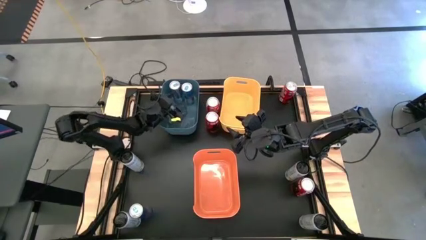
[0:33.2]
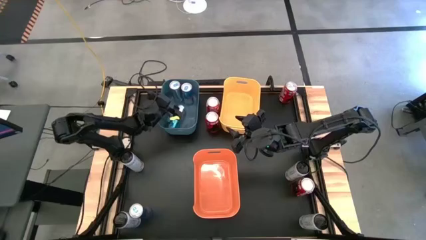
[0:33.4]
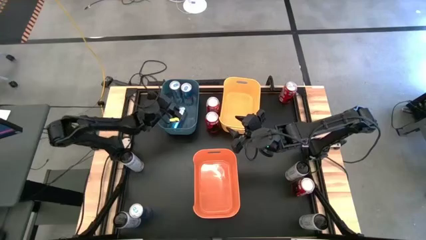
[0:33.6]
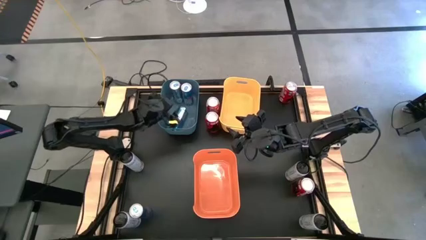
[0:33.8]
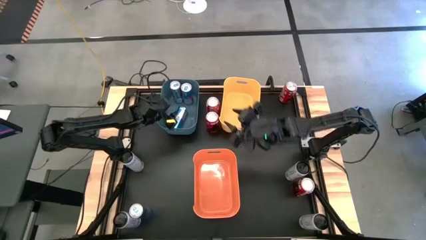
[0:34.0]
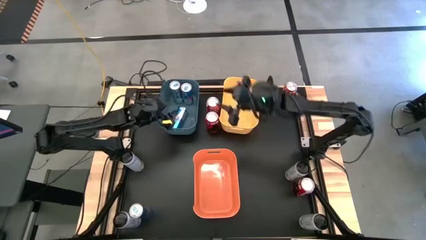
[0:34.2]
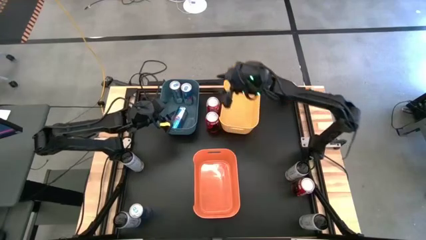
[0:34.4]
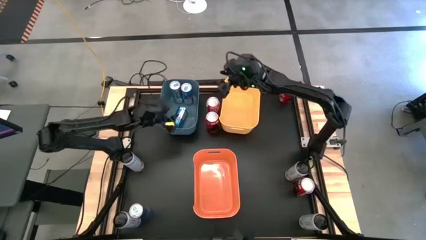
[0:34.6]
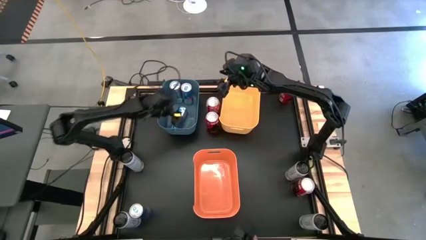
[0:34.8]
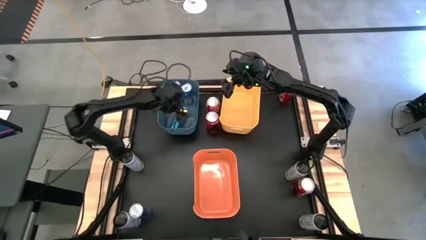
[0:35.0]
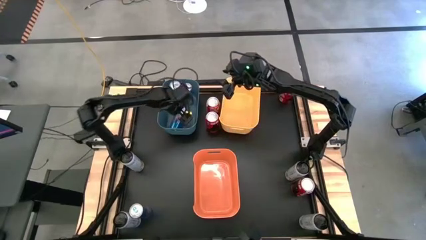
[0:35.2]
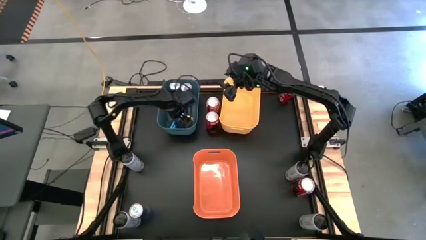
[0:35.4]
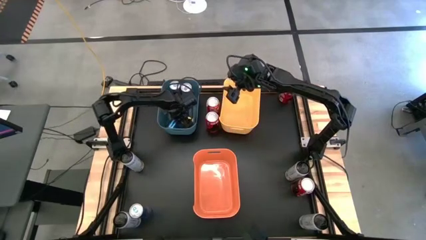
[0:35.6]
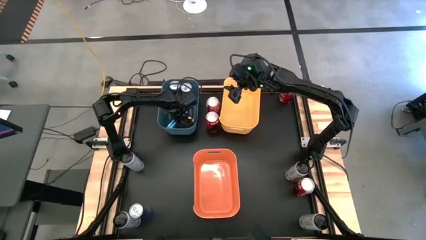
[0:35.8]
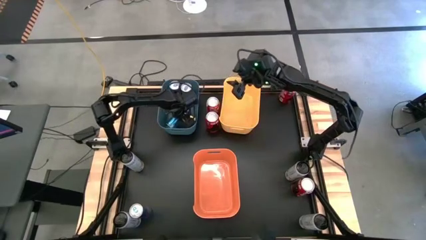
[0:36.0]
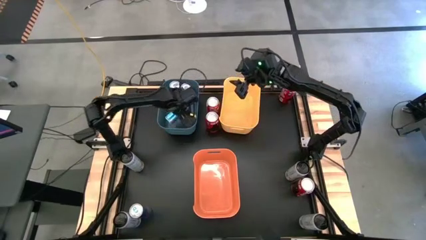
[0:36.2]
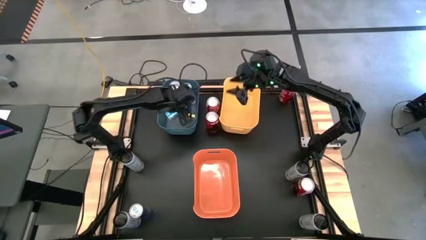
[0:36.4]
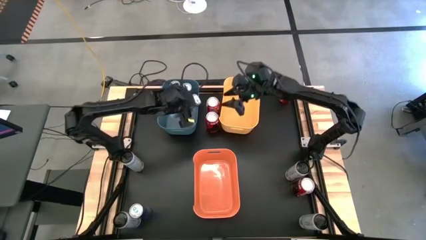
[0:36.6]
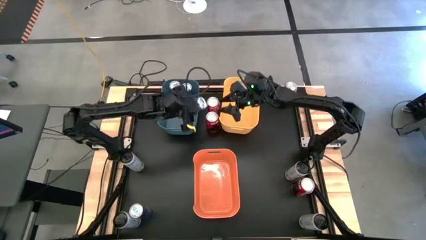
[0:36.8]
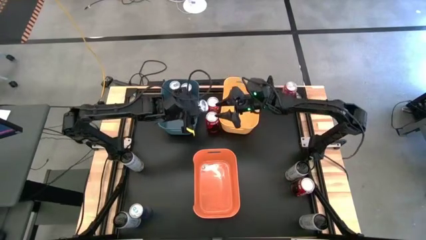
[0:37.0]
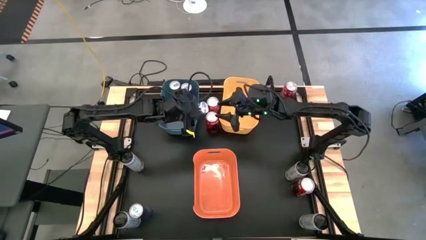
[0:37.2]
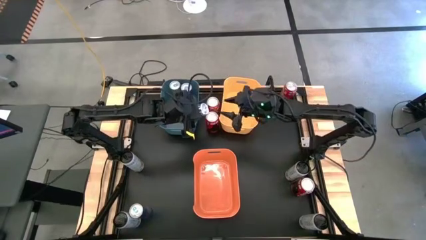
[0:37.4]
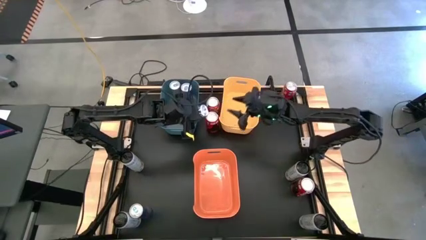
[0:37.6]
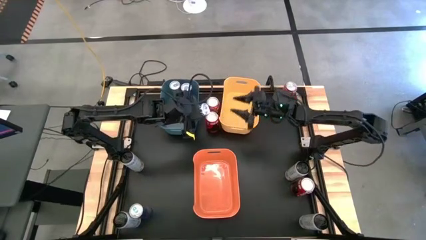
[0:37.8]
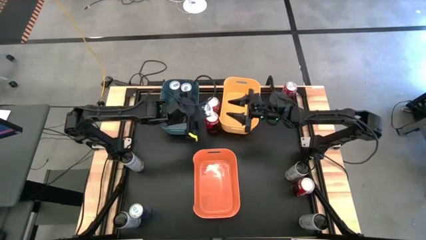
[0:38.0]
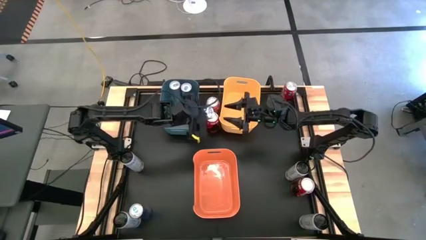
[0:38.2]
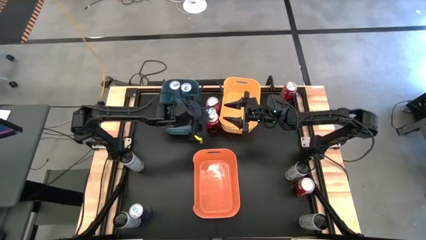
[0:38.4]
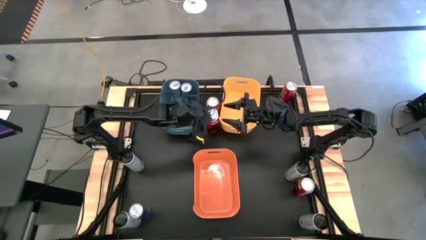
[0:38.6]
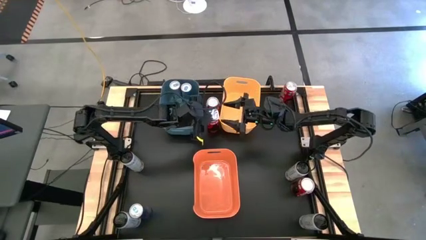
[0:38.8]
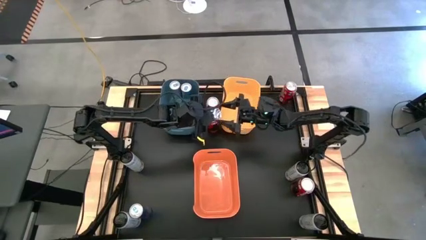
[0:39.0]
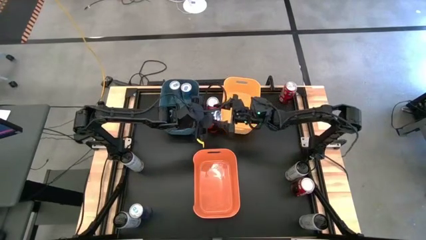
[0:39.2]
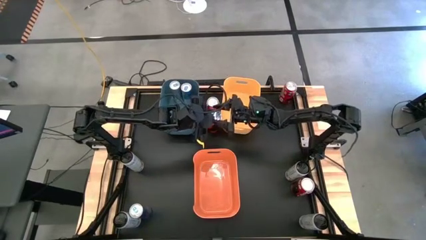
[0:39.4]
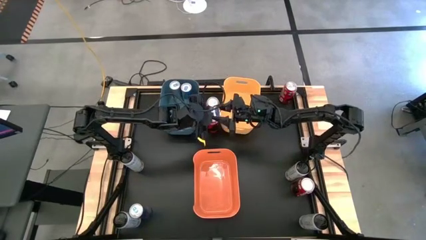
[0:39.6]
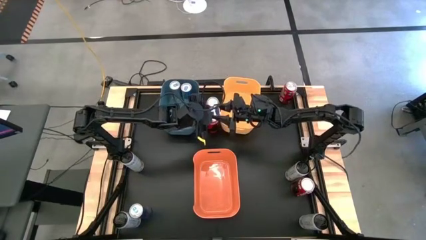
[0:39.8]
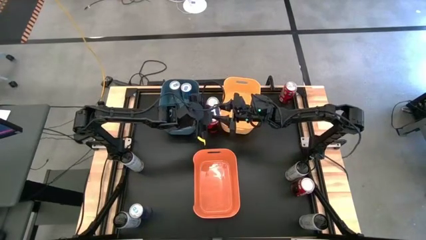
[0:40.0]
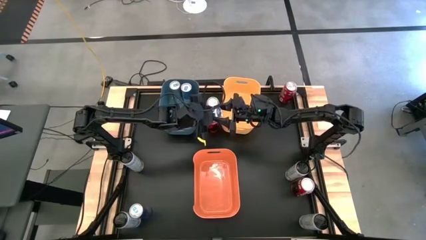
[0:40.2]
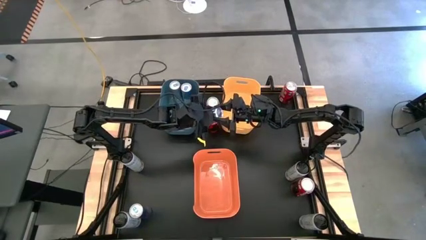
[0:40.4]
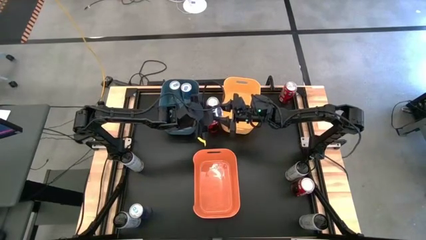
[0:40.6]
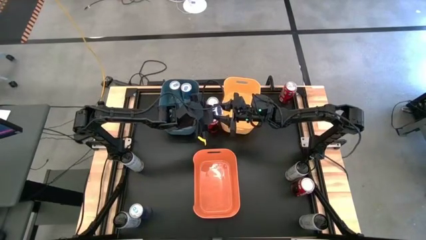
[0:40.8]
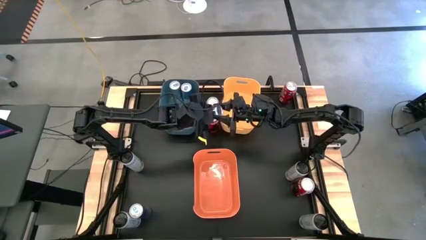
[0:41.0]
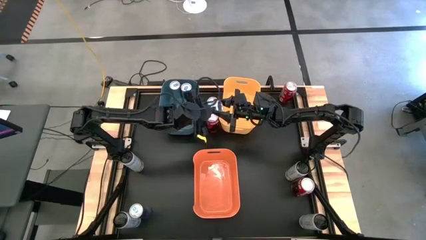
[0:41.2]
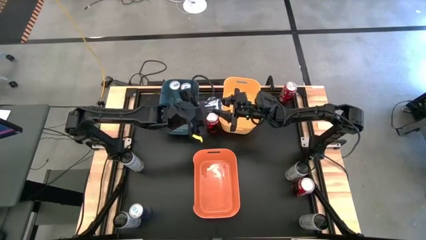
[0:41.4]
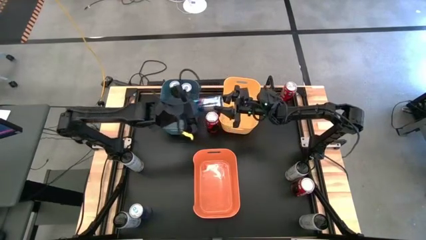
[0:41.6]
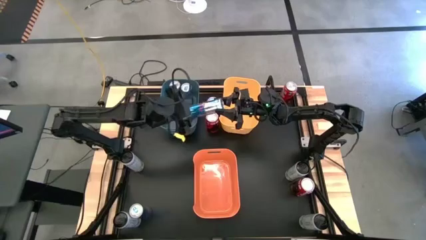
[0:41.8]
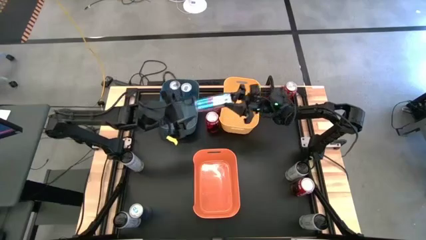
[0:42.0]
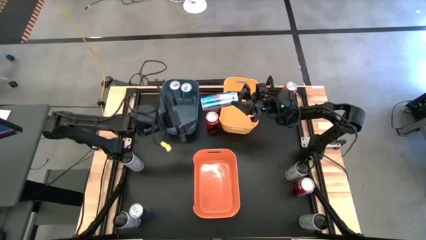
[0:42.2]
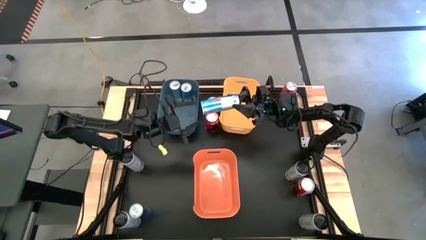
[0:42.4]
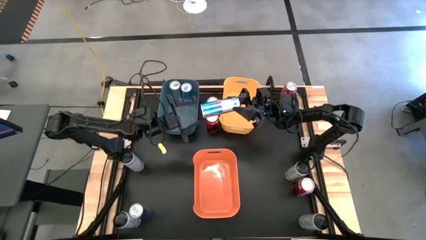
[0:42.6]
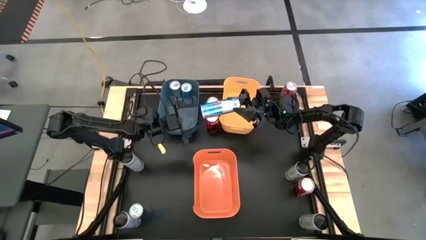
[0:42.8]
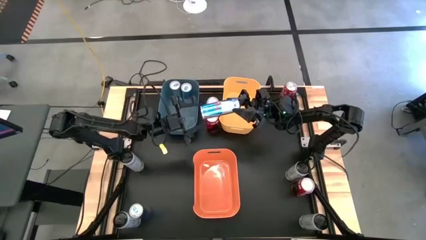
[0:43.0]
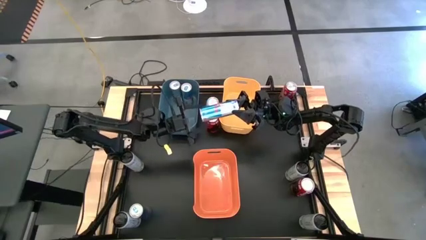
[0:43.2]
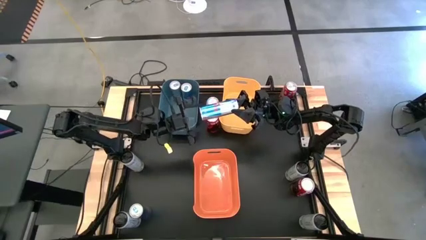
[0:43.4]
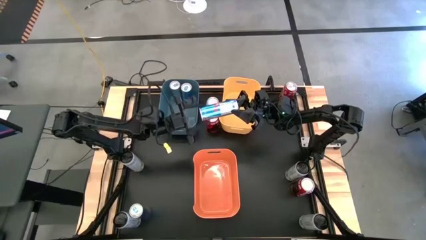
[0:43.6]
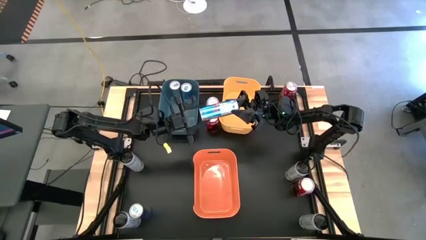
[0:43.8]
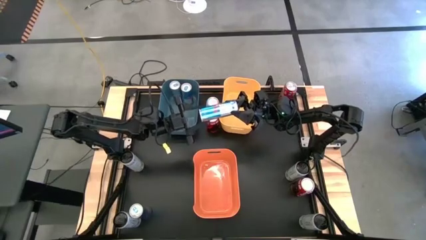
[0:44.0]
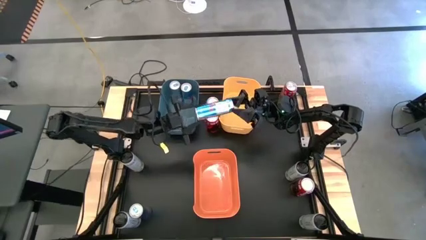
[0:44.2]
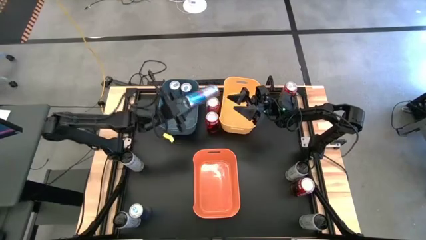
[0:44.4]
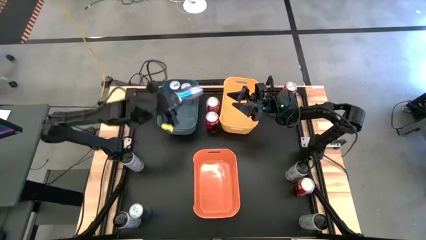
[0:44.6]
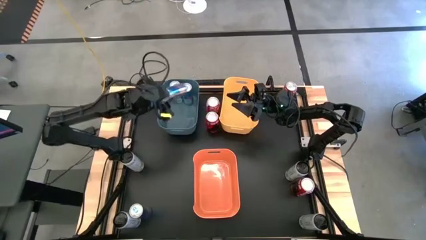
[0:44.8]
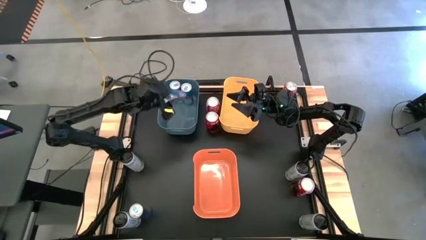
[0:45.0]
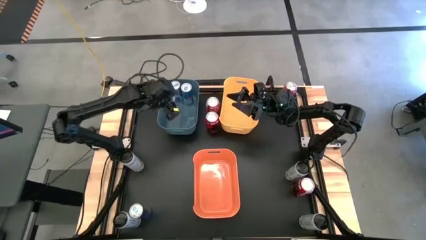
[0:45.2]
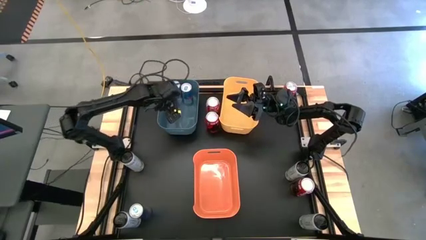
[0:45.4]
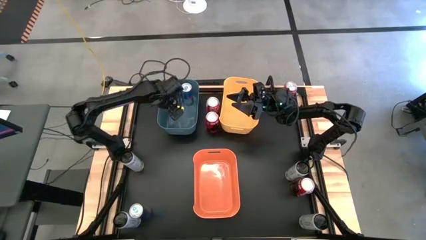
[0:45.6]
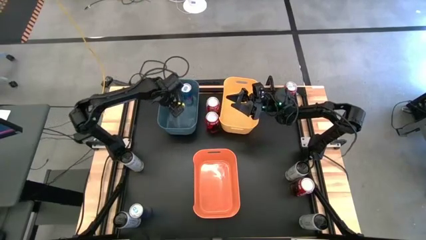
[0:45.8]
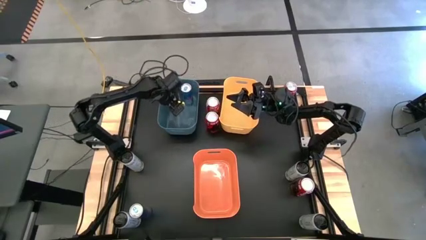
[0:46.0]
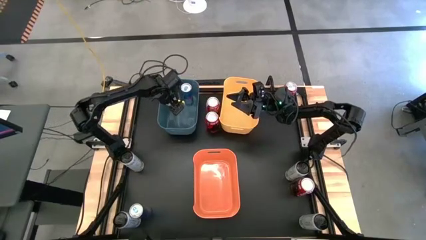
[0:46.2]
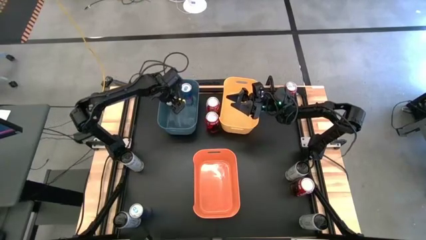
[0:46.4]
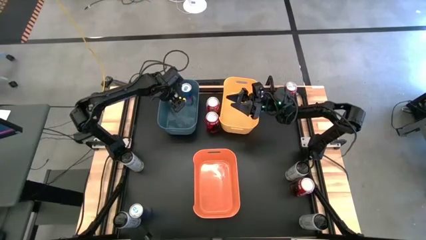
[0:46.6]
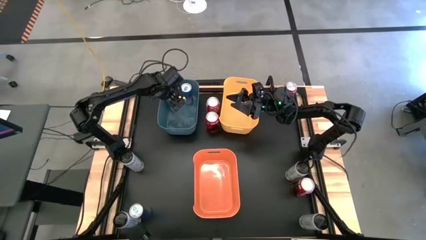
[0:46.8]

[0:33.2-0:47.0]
Task: Sort soda cans
Put the top blue soda can into the blue bin
